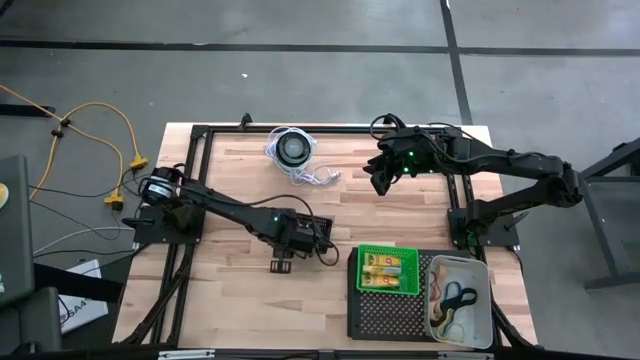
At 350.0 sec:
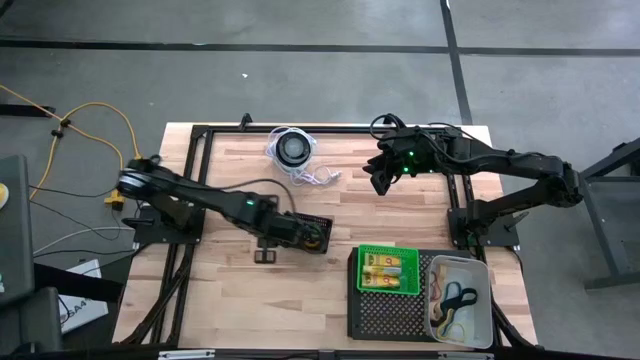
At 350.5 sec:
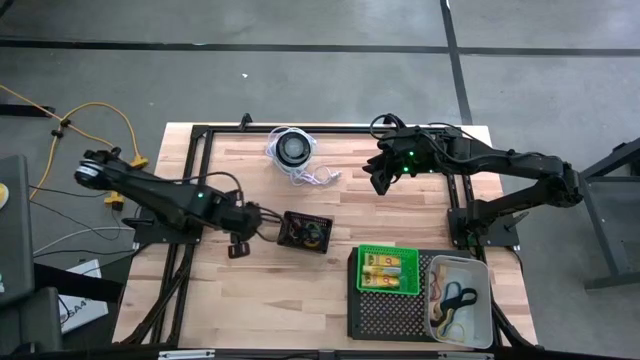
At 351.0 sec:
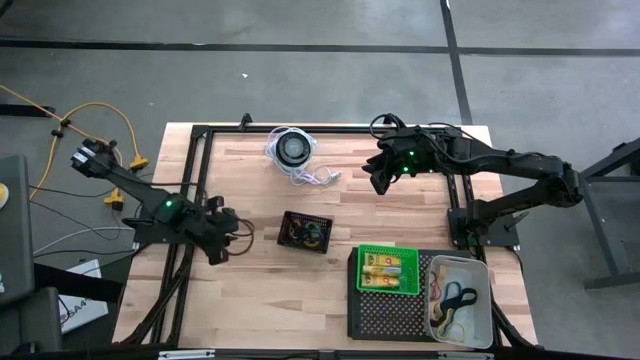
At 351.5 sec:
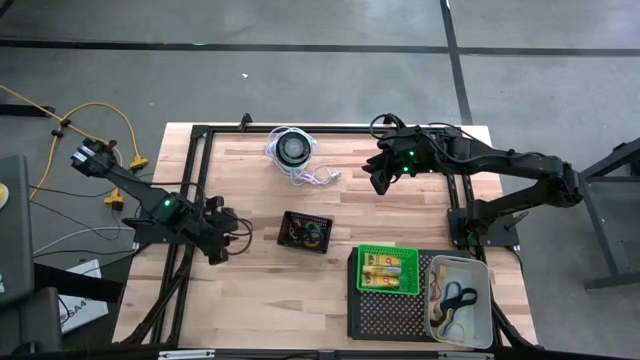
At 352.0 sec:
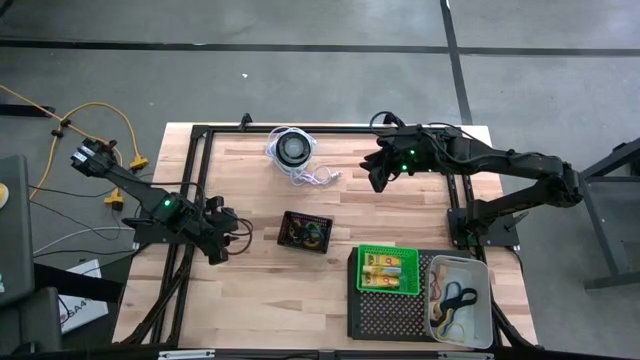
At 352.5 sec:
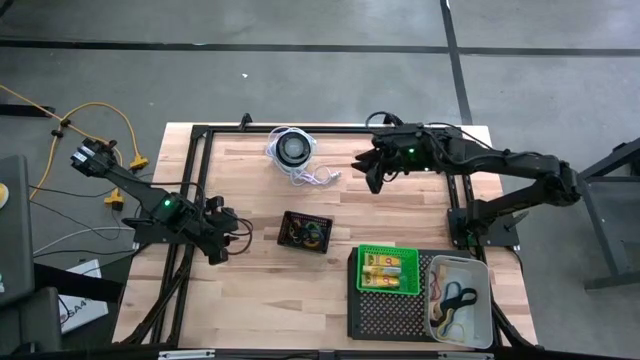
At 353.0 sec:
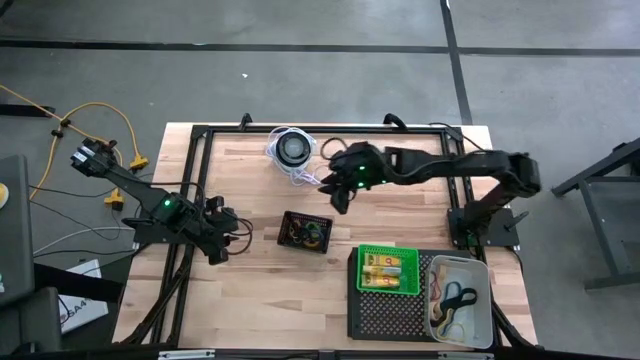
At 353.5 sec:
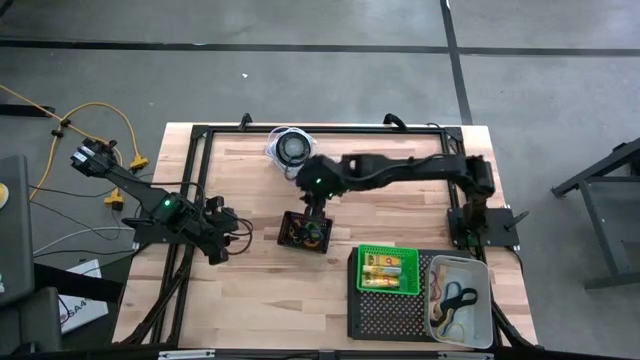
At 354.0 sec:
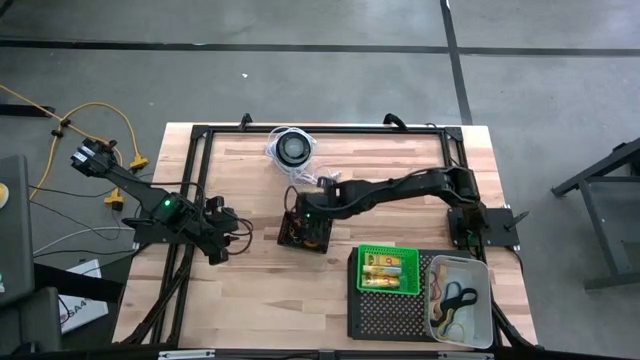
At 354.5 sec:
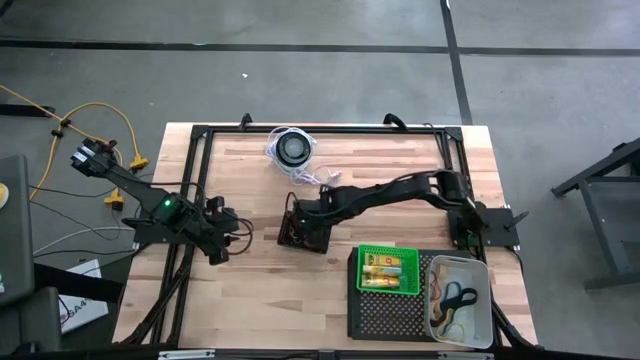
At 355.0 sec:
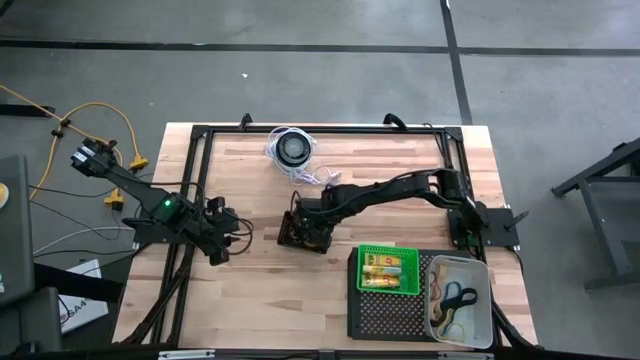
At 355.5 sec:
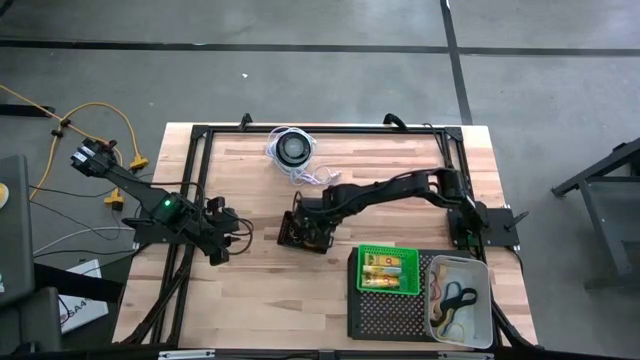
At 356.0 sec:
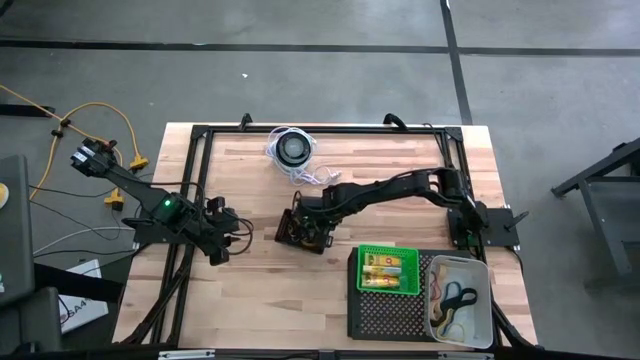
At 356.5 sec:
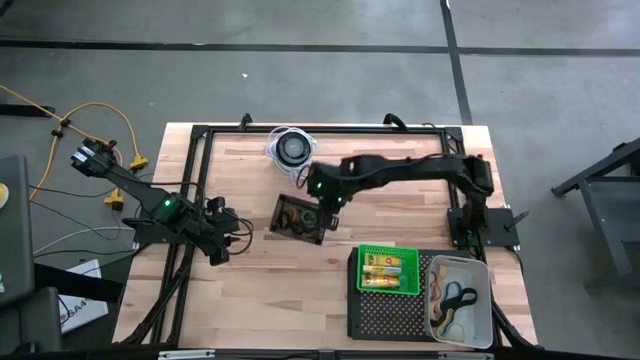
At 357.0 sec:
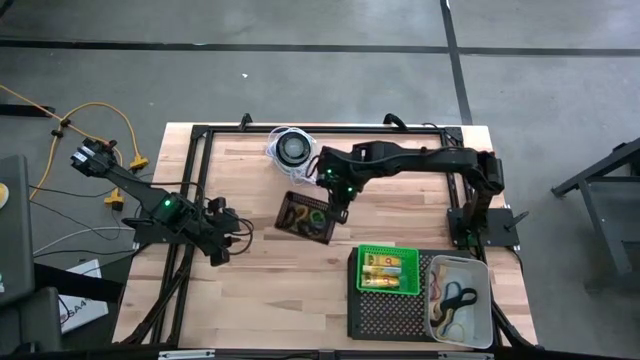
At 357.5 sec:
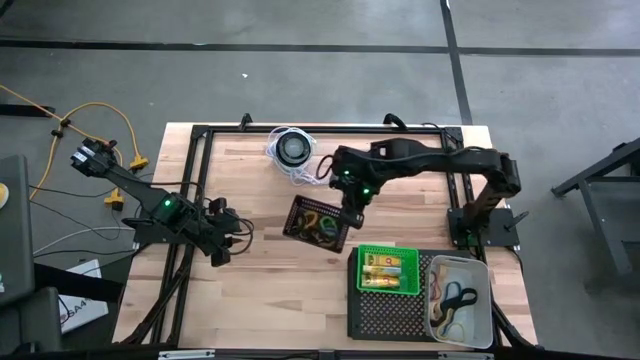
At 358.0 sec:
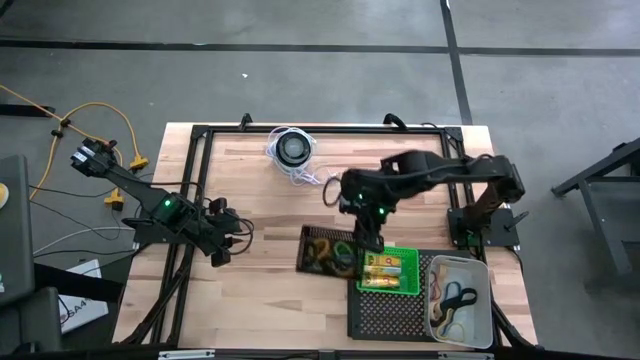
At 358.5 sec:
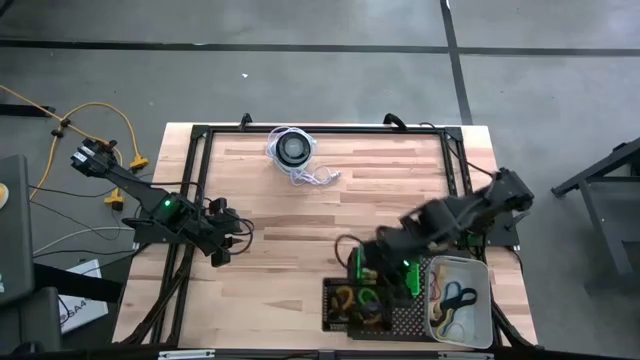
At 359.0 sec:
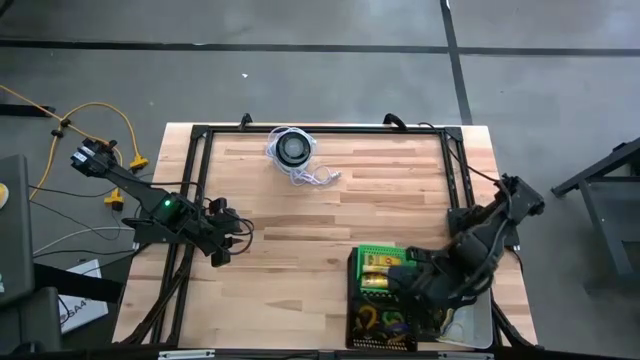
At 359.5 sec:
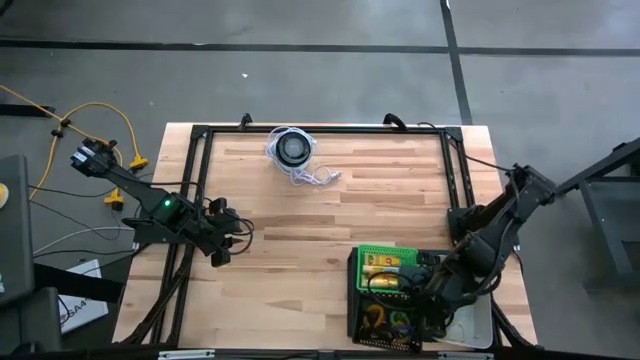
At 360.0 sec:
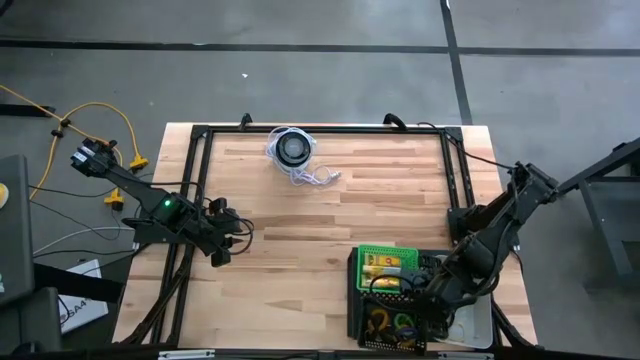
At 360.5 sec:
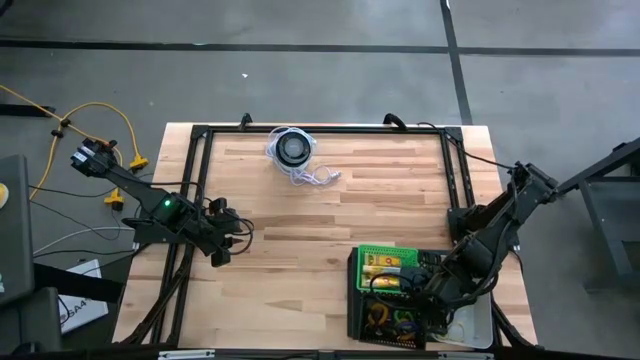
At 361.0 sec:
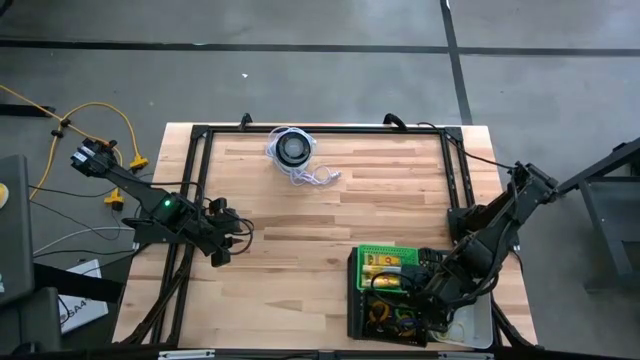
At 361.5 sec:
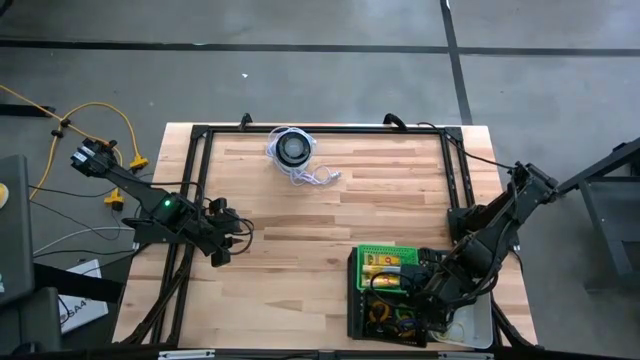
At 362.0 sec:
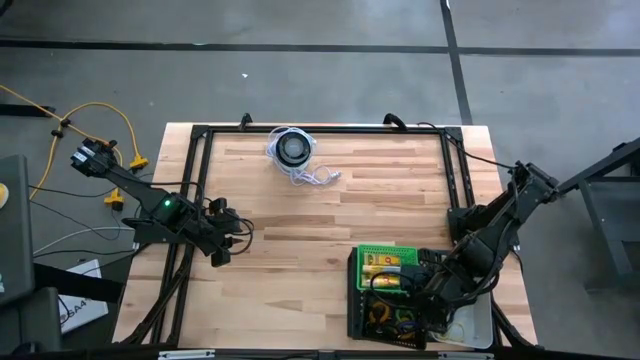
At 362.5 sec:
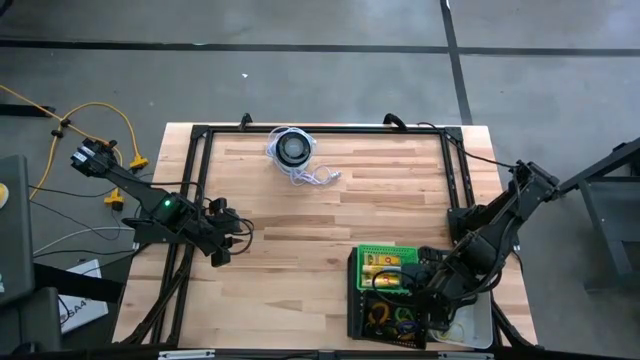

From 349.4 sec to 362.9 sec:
Task: Pick & Place Office Desk Supplies
Put the black bin on the shelf

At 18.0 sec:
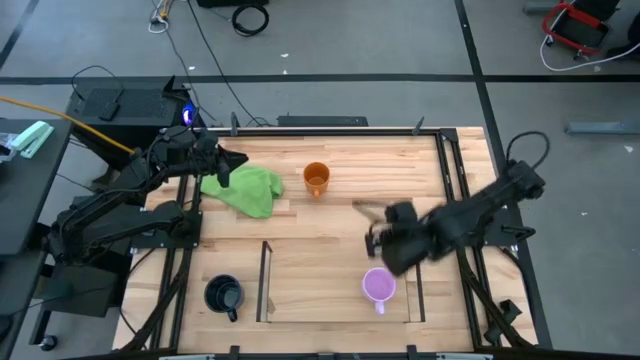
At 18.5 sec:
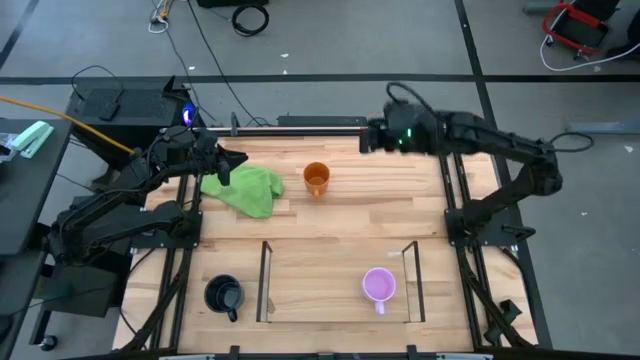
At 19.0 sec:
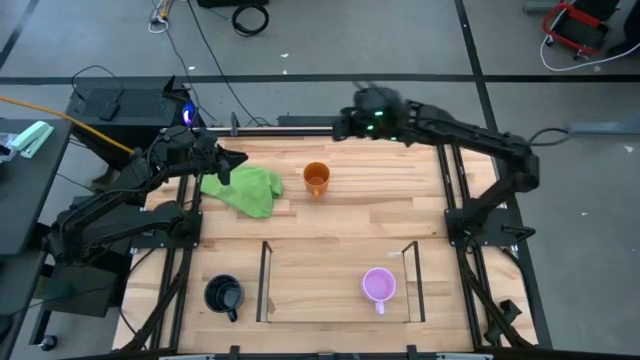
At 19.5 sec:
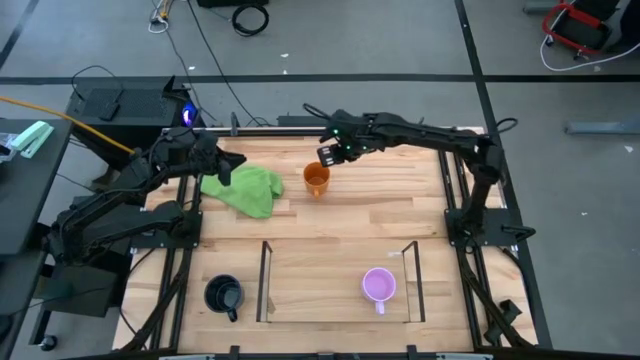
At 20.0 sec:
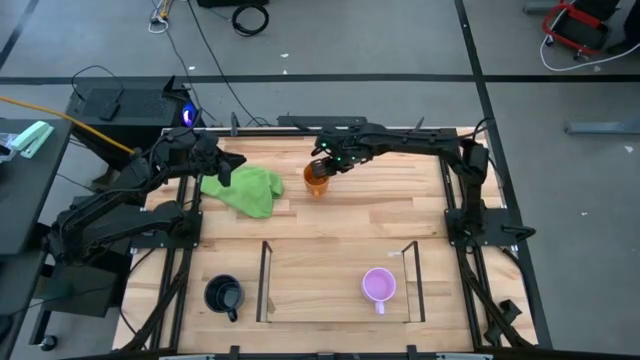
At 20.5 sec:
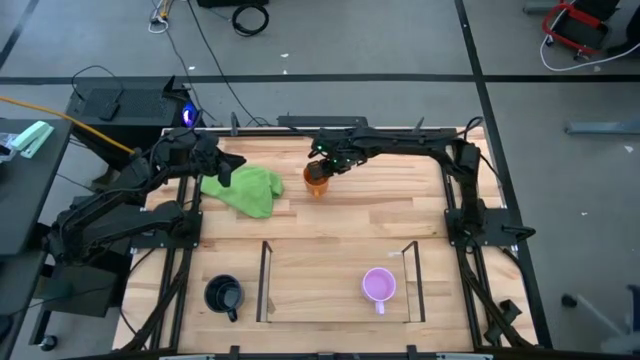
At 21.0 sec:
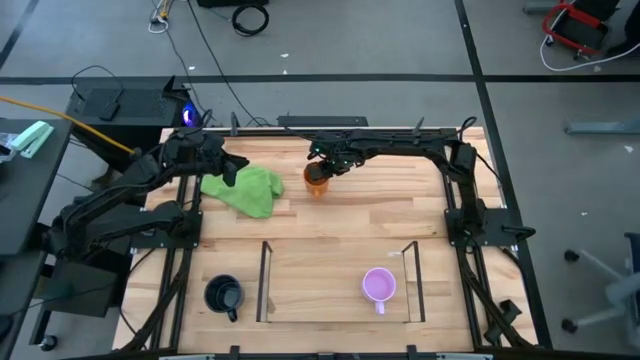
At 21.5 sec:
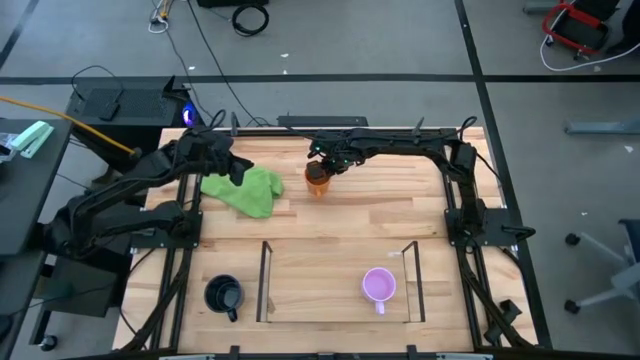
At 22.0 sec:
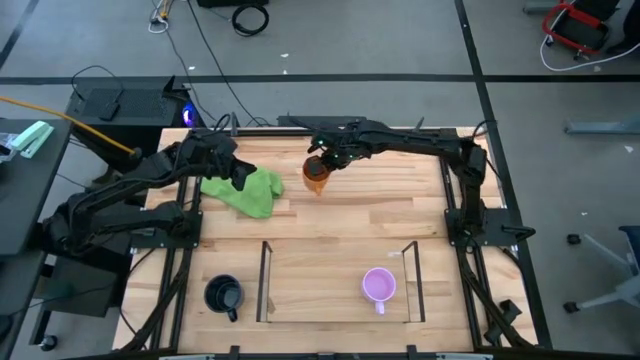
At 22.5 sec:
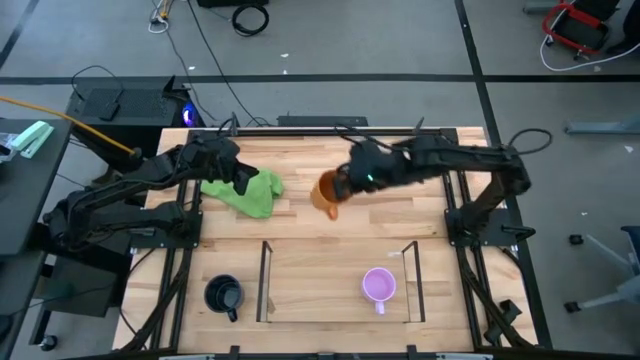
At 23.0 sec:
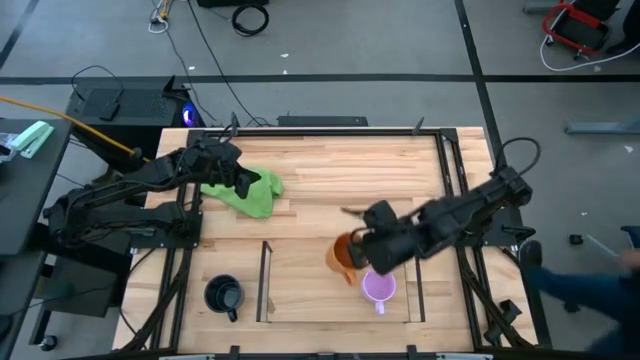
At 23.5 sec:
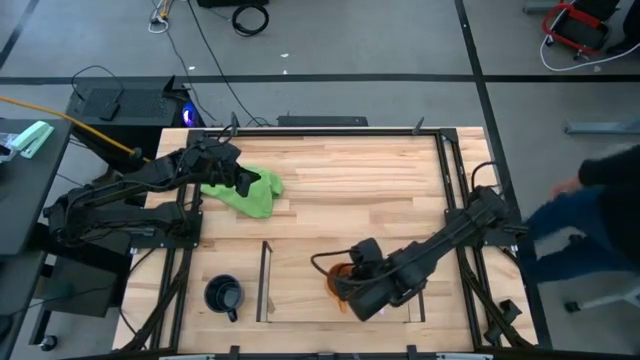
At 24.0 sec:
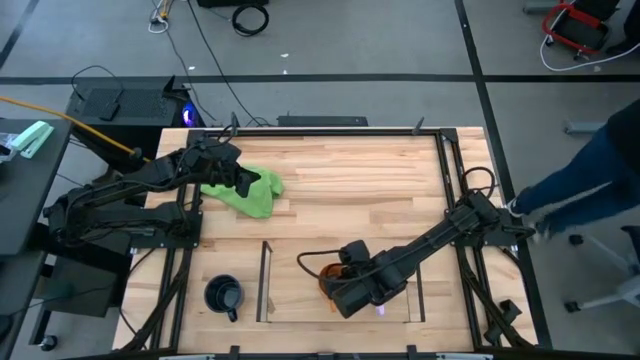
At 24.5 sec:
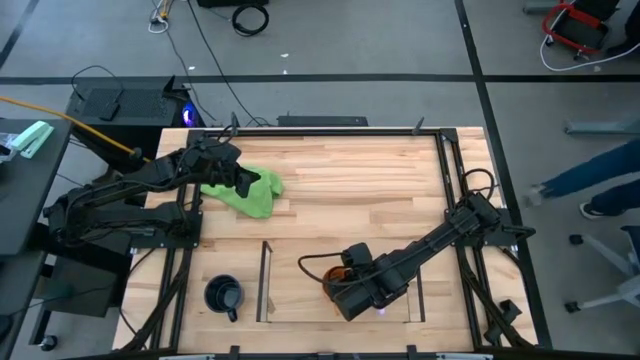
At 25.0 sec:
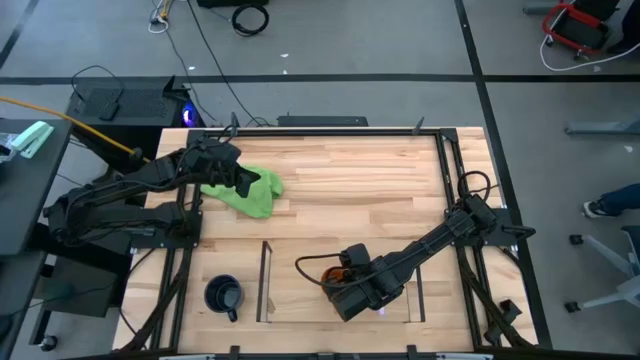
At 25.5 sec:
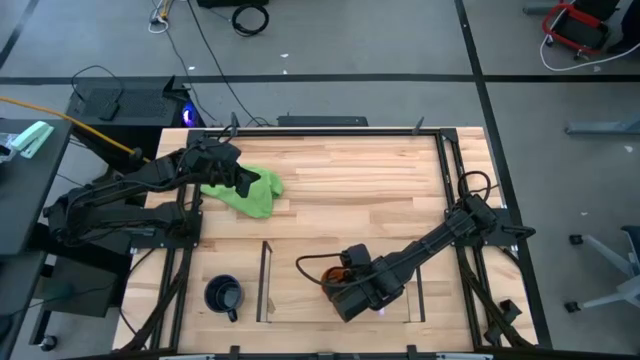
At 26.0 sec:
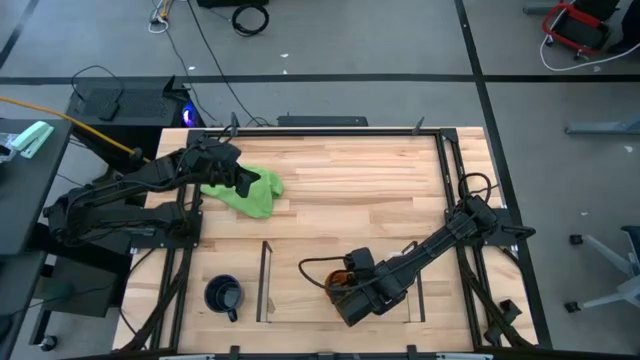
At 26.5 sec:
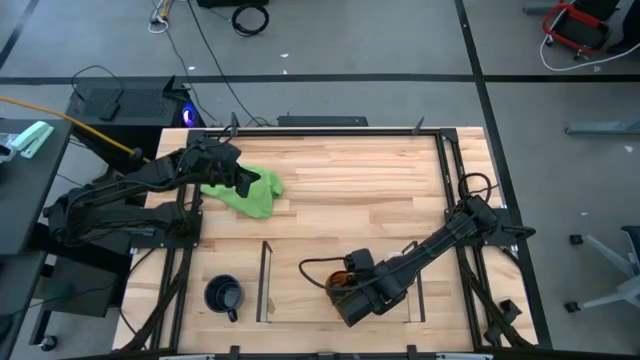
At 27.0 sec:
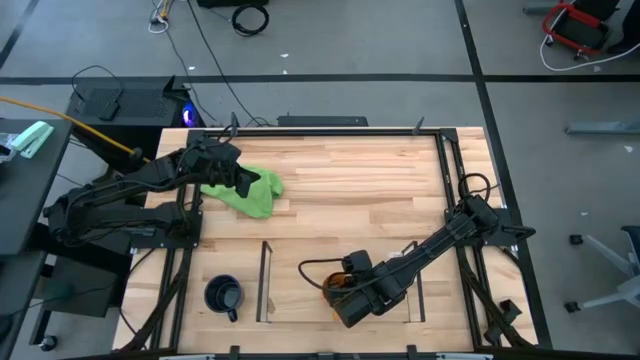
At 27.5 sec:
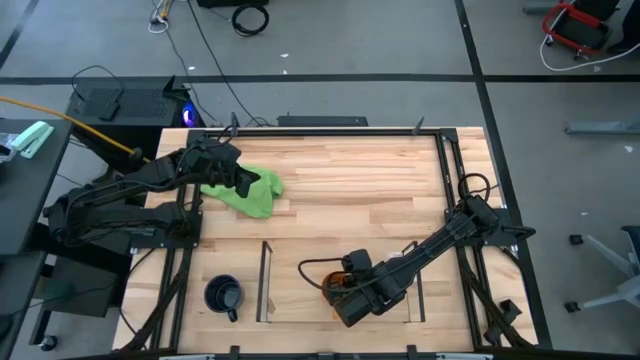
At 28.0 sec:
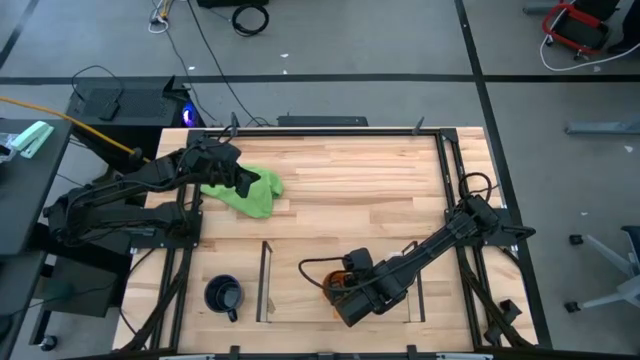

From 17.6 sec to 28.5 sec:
Task: Stack small to large cups/mugs on shelf
Put the orange cup on the shelf
